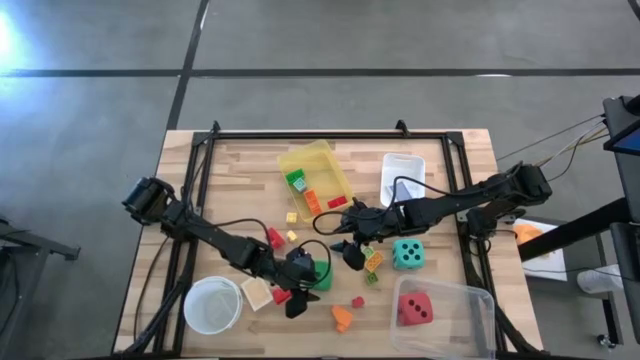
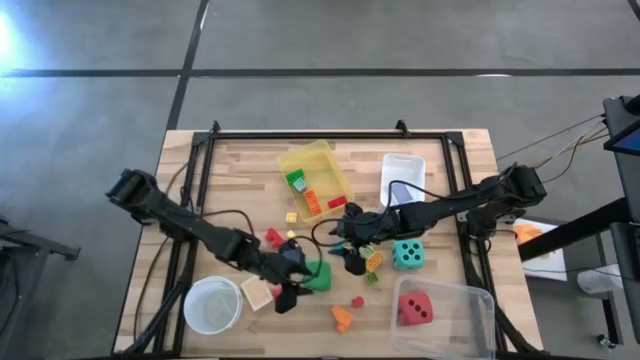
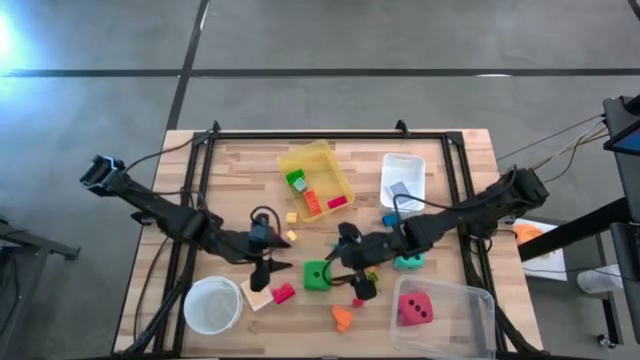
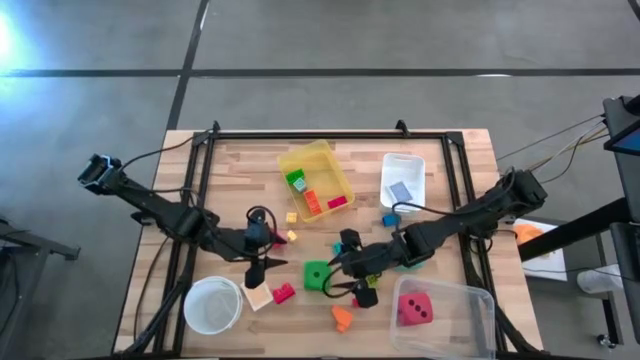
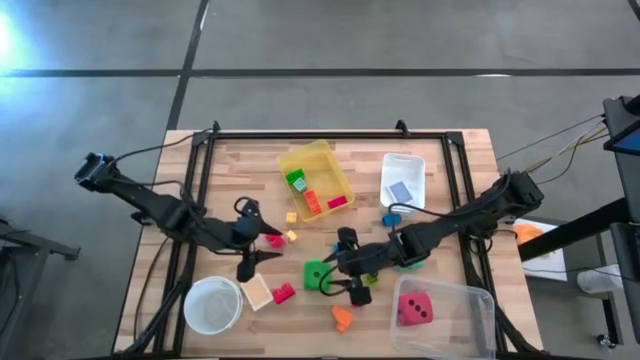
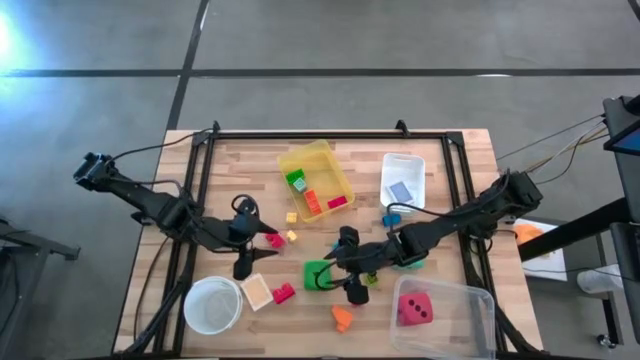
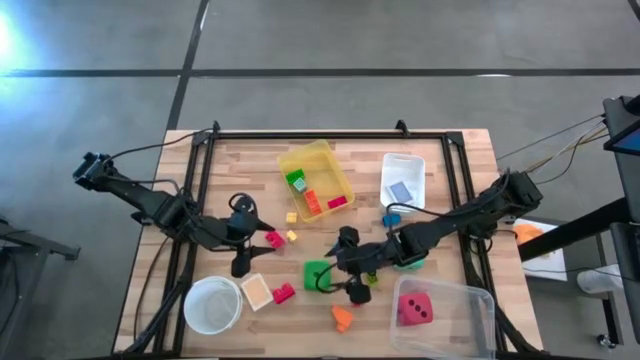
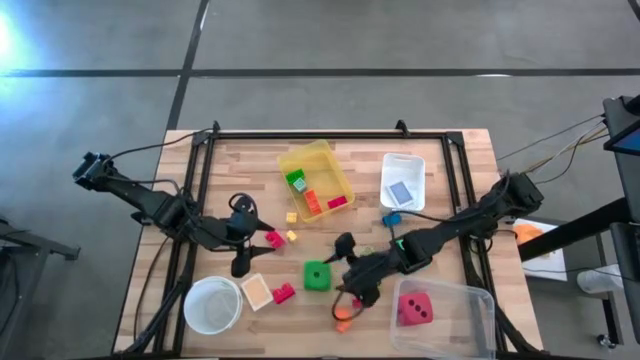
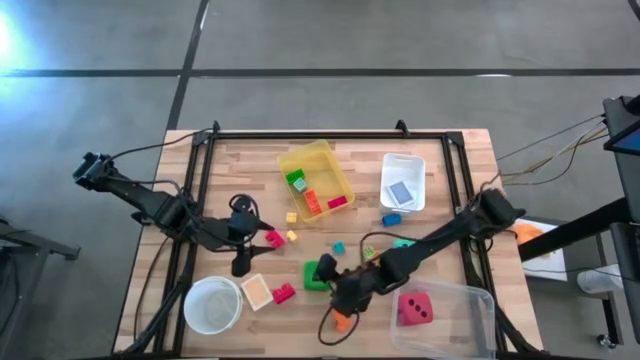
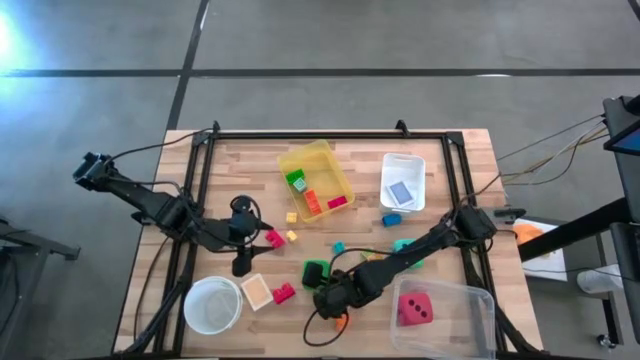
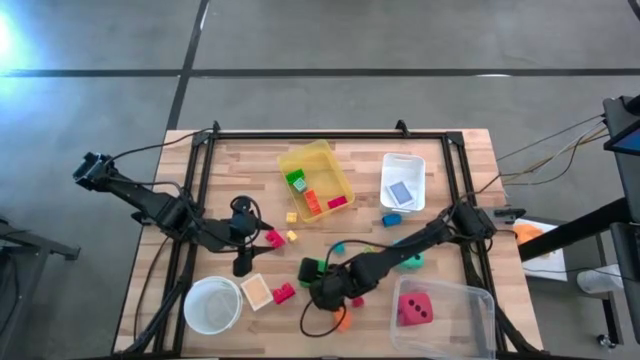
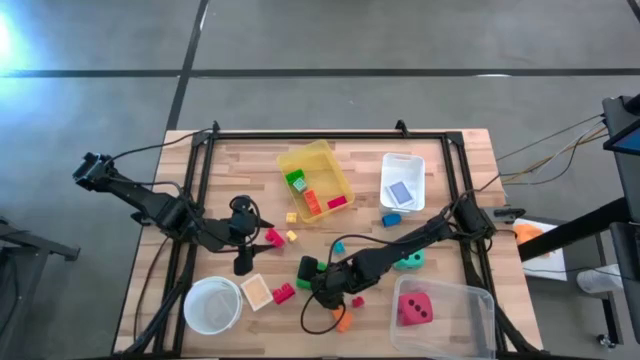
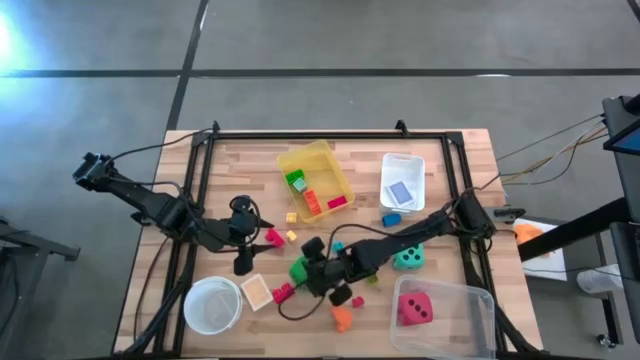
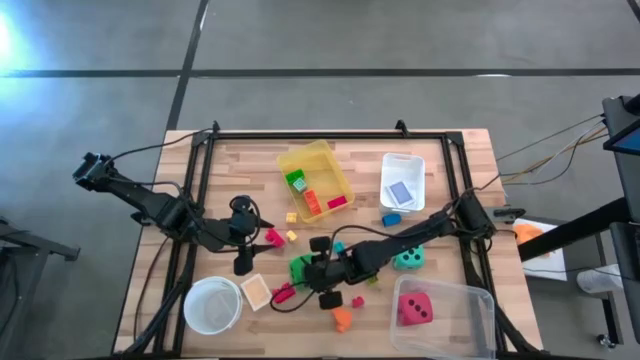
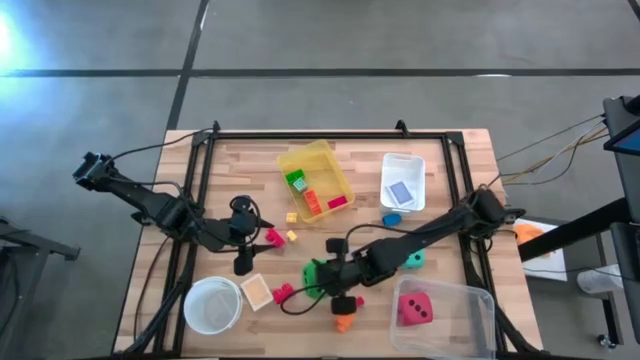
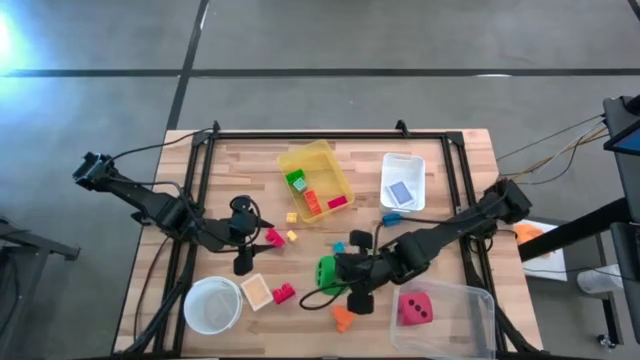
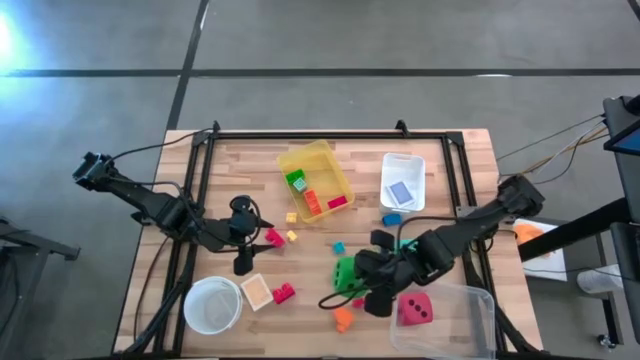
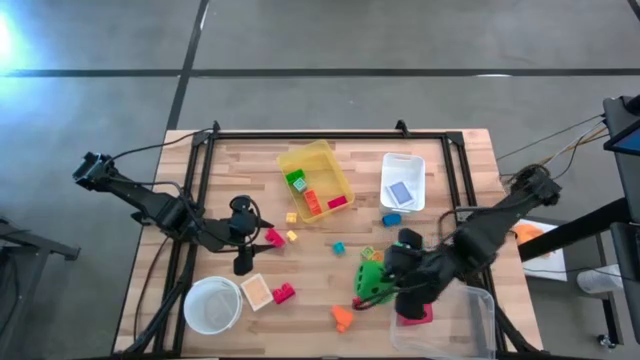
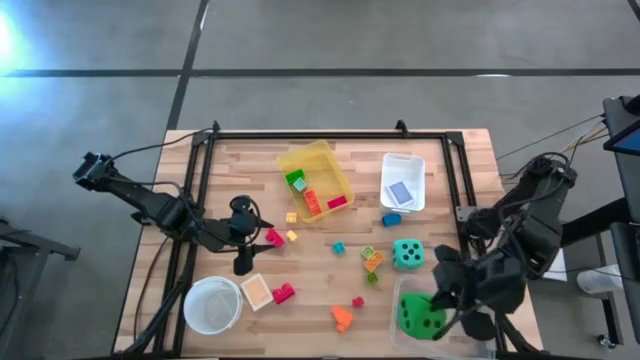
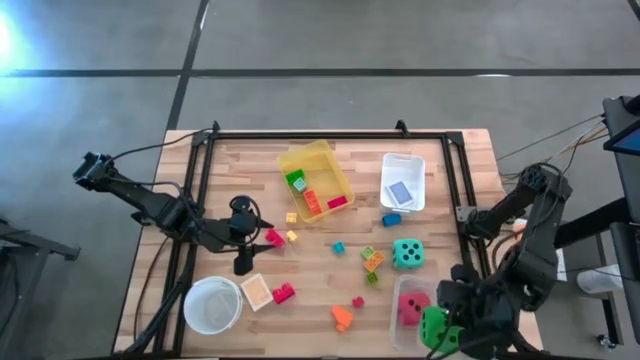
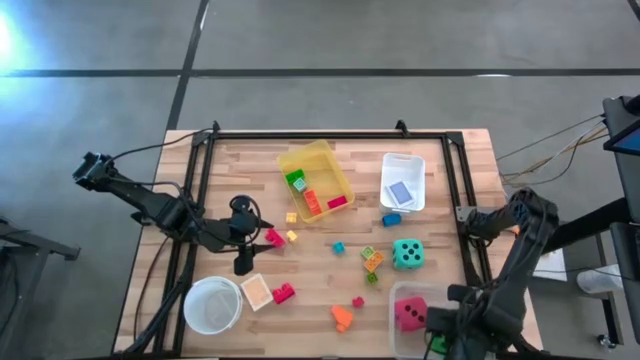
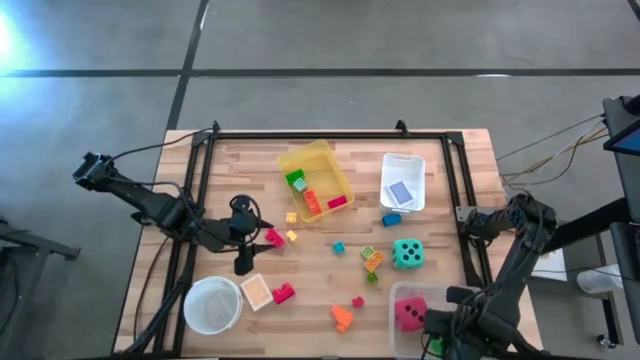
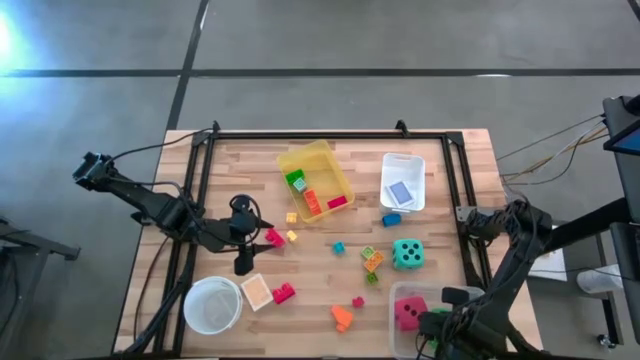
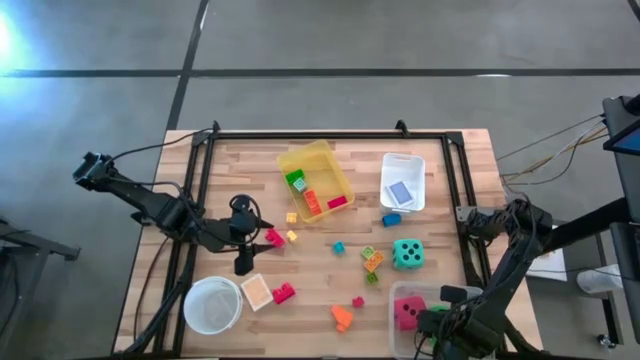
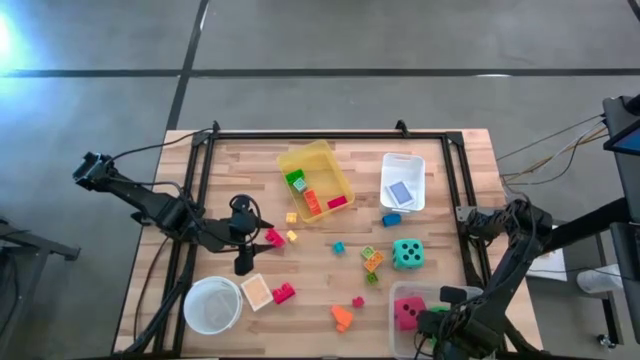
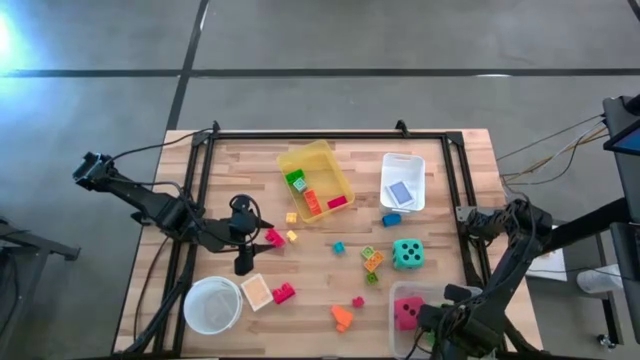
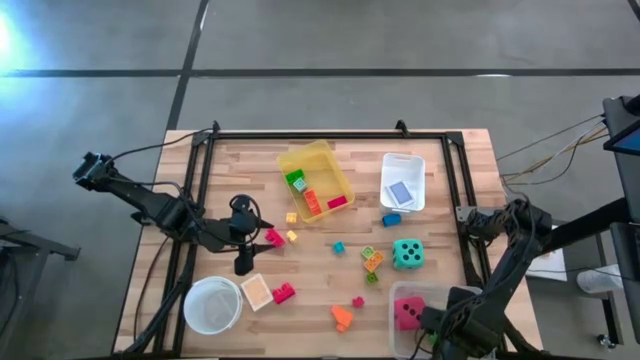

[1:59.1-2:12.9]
Task: Pick & Place Toys
Put the green dice into the transparent bin

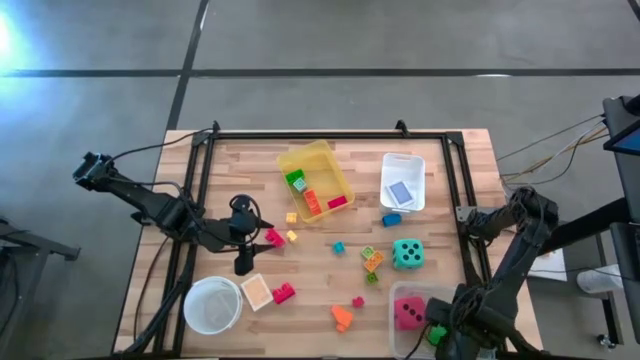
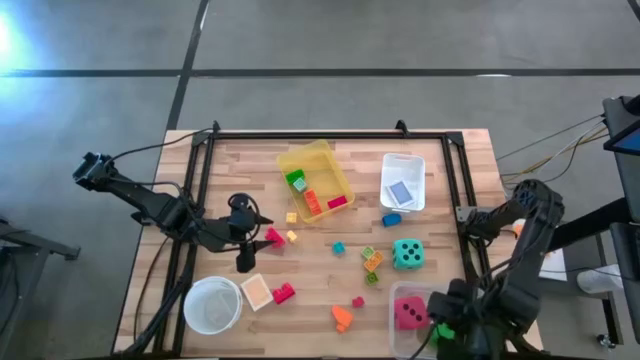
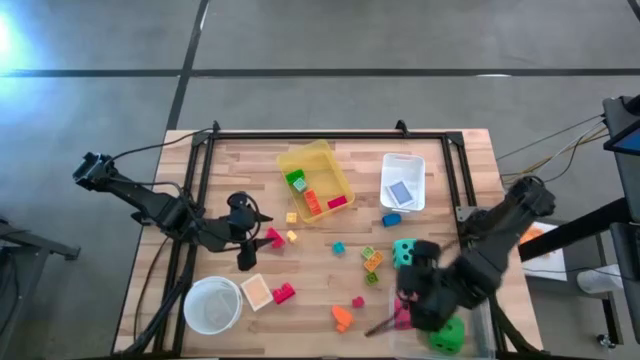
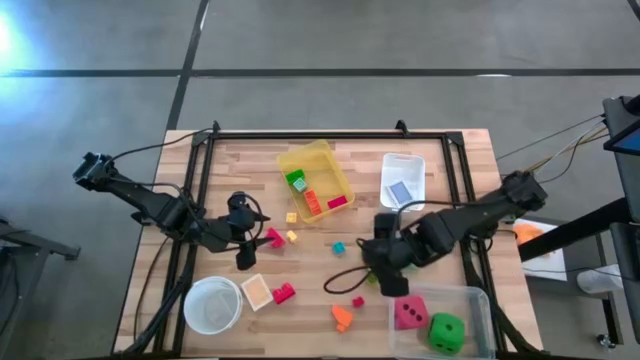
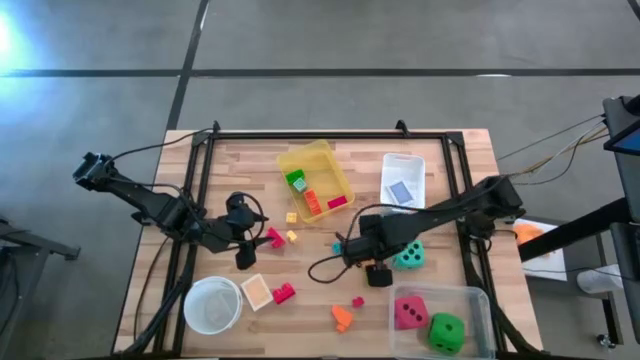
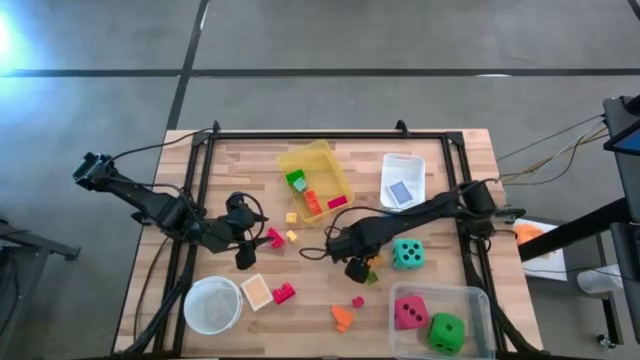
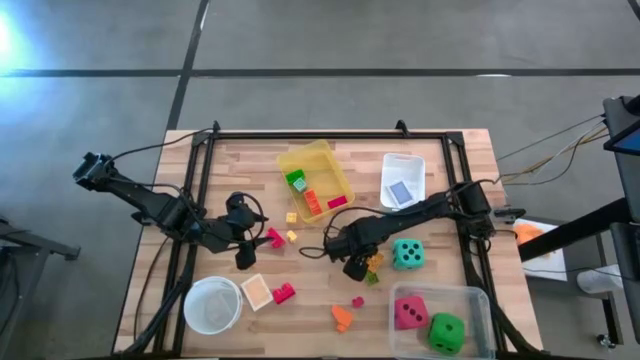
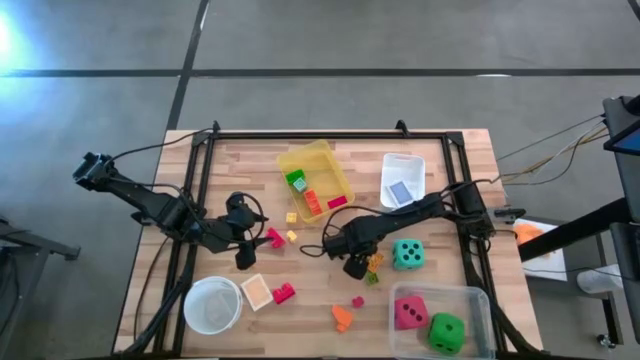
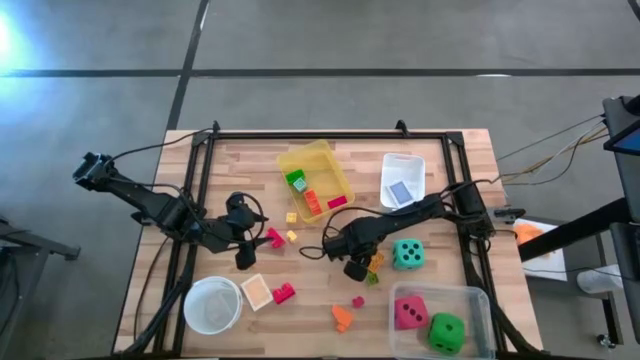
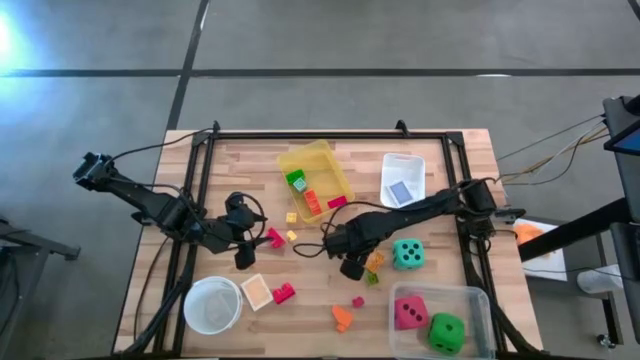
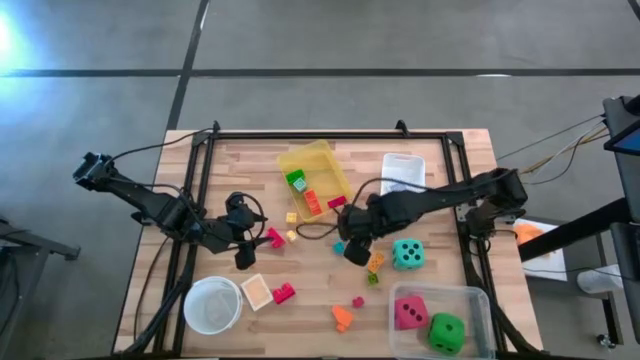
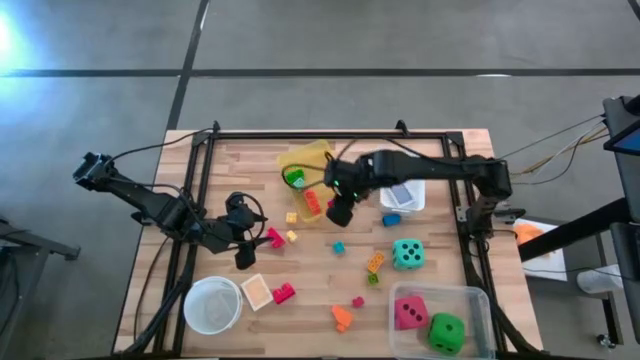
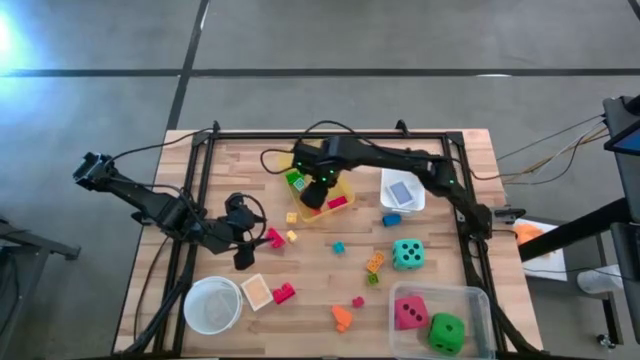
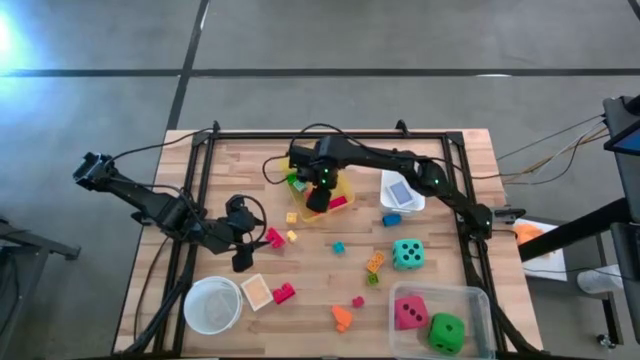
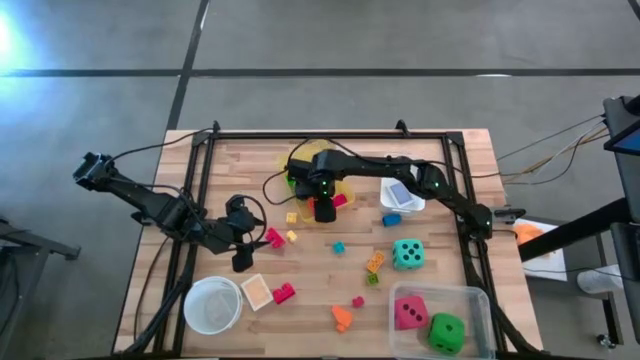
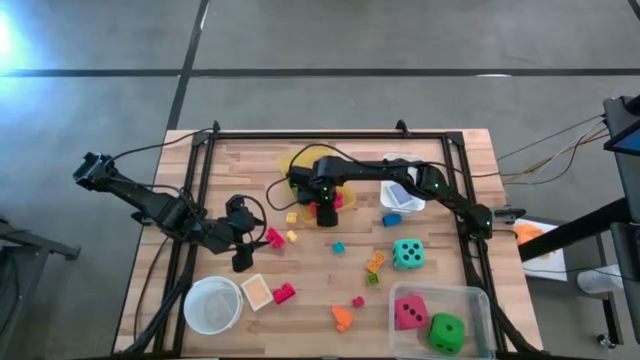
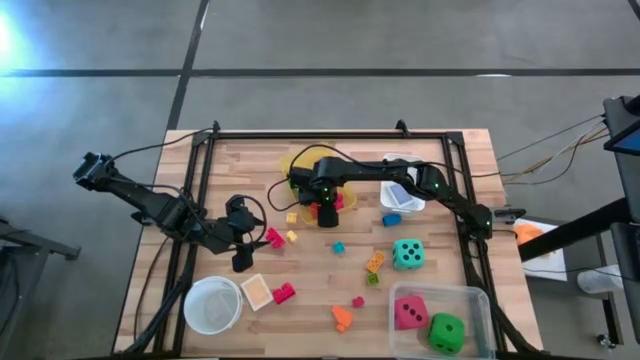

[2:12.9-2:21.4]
Put the light green game piece into the yellow bin
